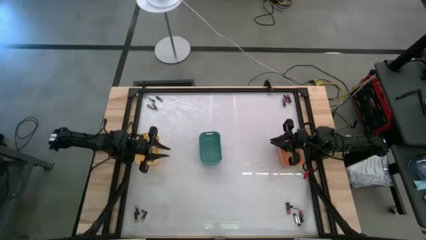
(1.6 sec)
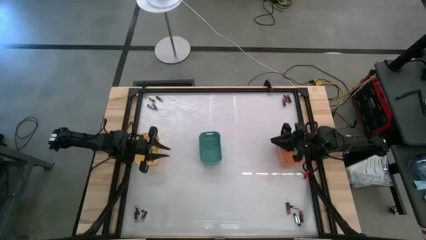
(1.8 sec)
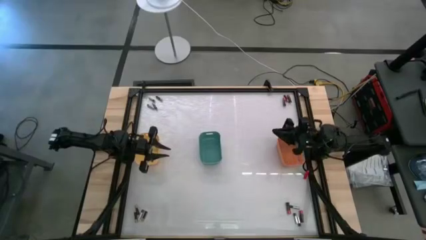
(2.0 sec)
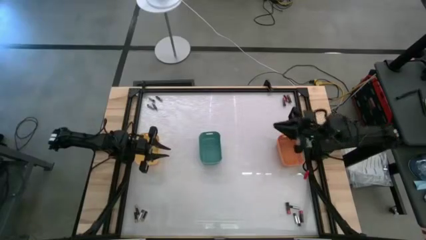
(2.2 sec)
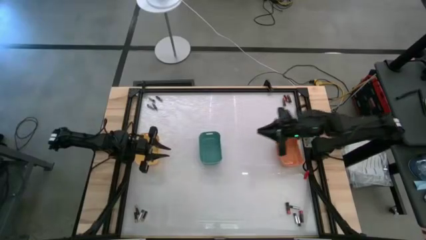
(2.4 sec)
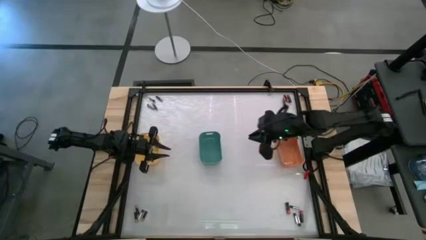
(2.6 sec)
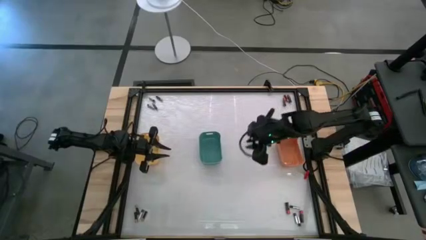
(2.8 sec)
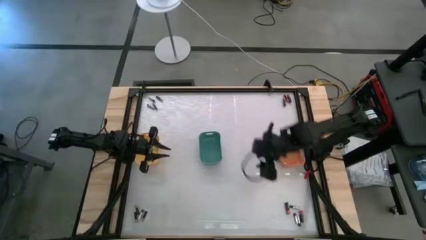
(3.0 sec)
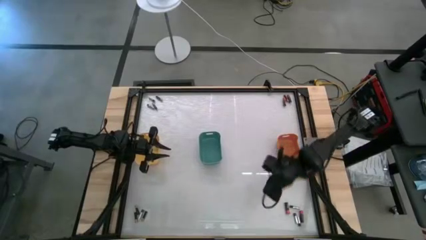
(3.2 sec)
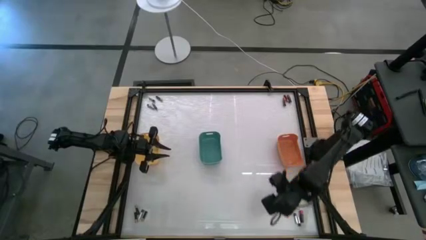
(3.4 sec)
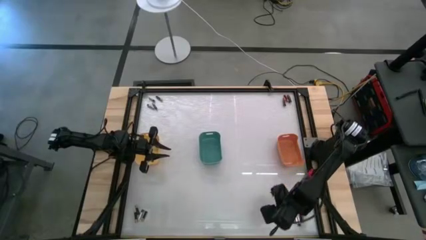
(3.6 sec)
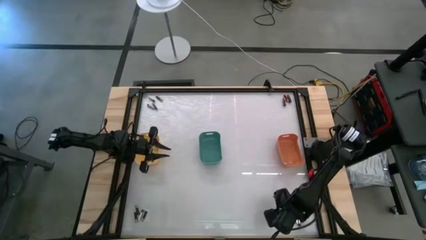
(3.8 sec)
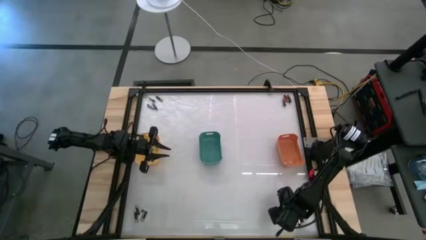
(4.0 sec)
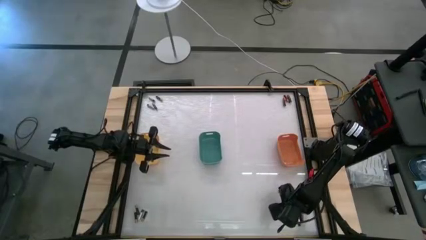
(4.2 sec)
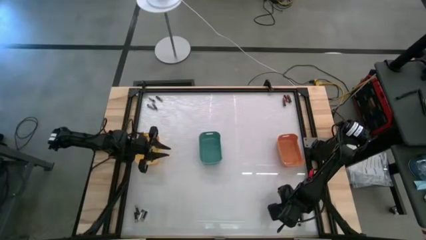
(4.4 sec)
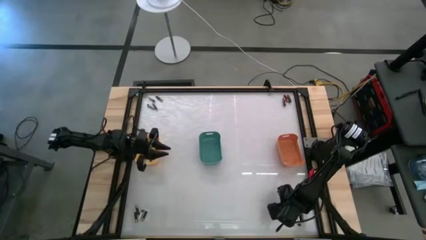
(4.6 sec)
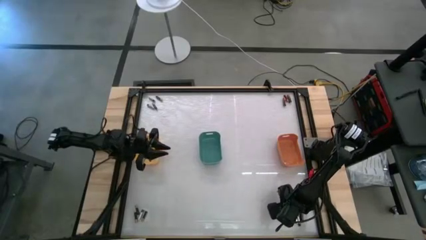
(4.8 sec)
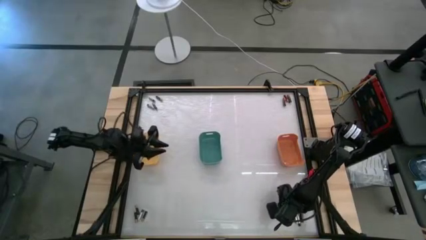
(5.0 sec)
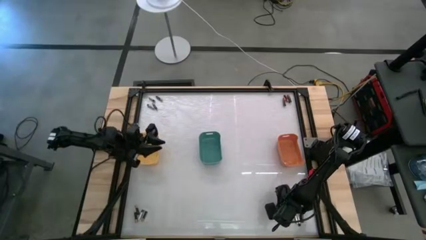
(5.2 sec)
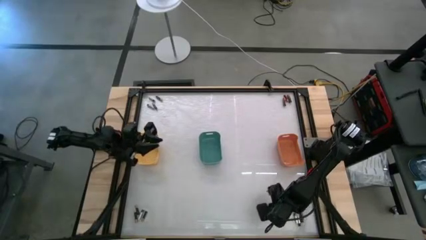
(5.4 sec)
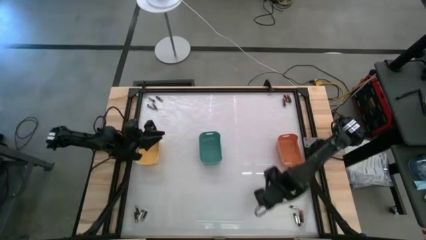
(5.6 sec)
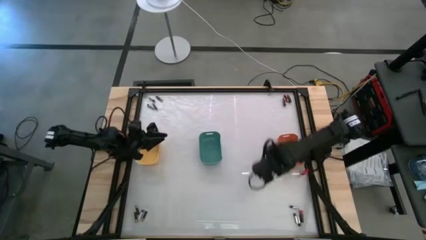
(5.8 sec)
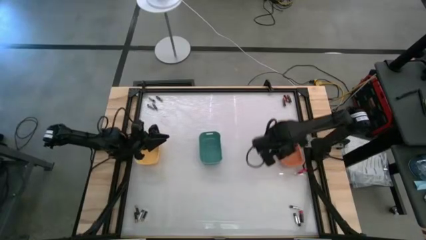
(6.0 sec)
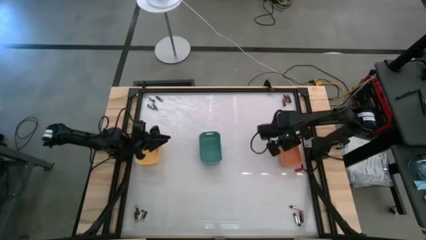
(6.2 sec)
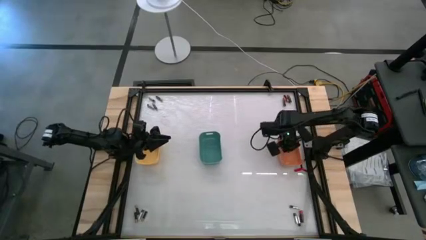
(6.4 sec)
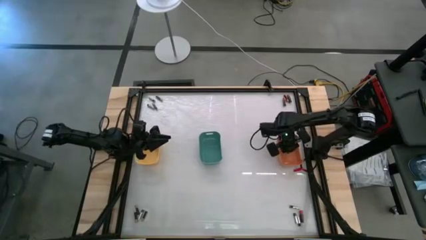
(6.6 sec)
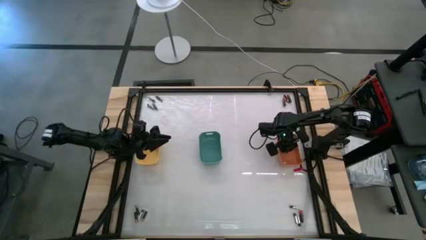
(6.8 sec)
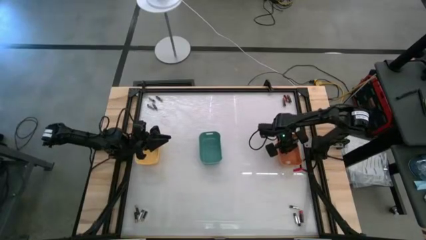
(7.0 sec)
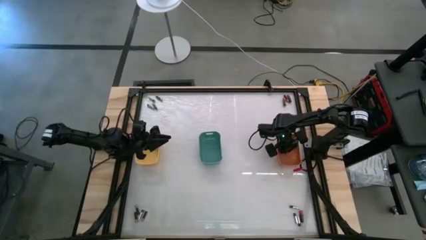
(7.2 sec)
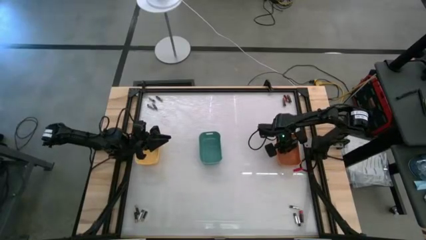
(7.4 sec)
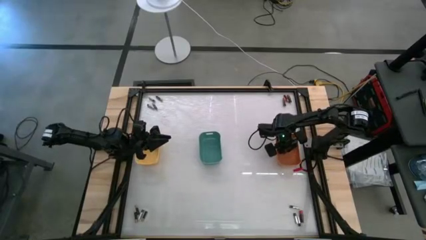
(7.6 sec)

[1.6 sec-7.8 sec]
Task: Sort batteries
Put the red battery into the orange bin

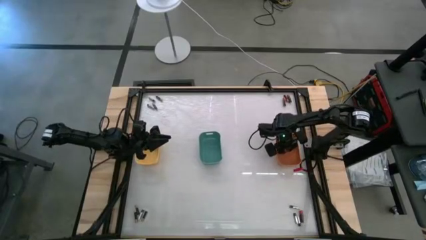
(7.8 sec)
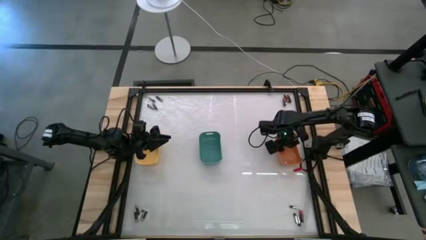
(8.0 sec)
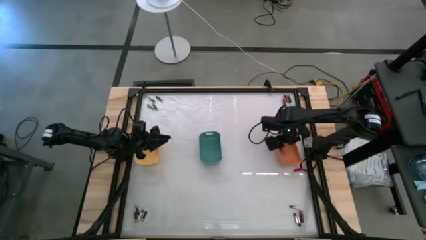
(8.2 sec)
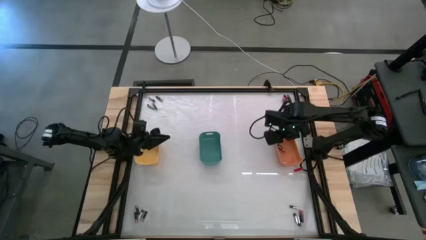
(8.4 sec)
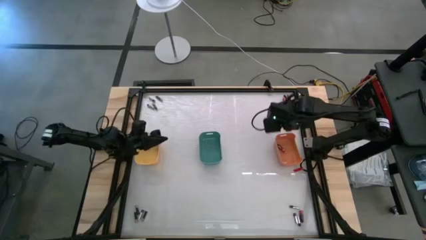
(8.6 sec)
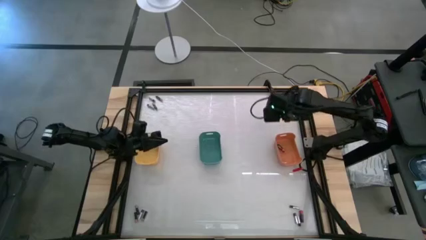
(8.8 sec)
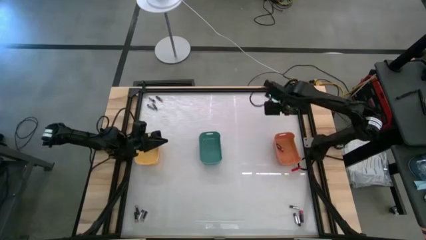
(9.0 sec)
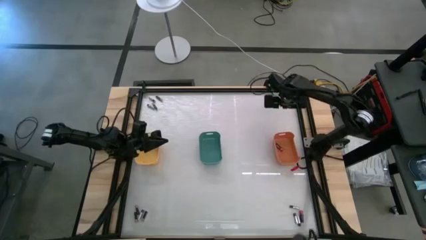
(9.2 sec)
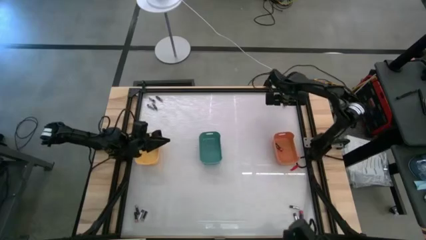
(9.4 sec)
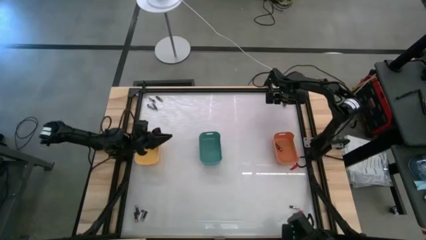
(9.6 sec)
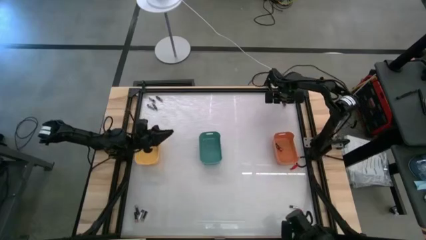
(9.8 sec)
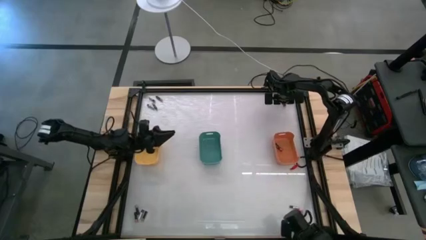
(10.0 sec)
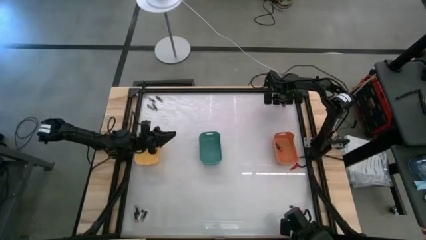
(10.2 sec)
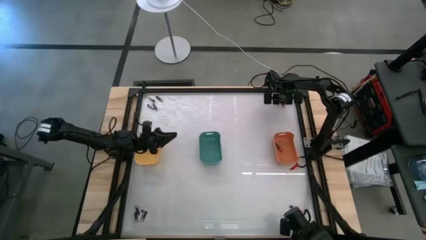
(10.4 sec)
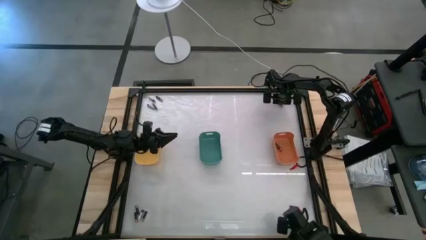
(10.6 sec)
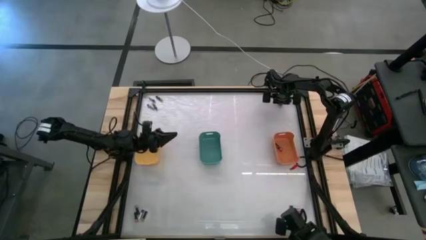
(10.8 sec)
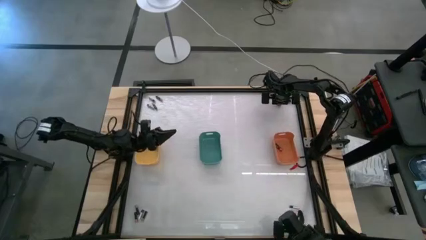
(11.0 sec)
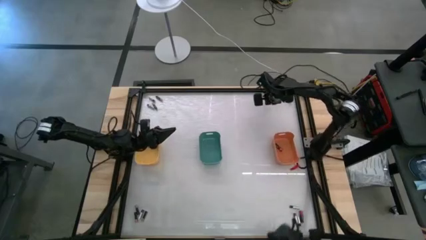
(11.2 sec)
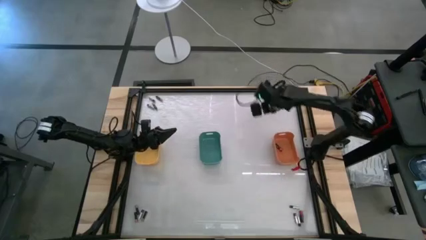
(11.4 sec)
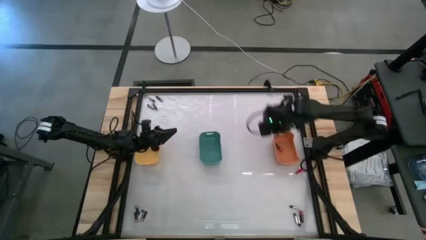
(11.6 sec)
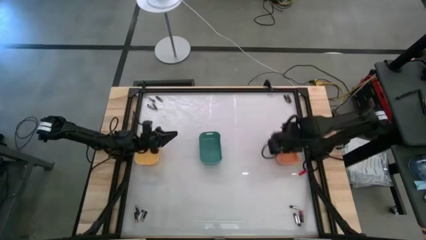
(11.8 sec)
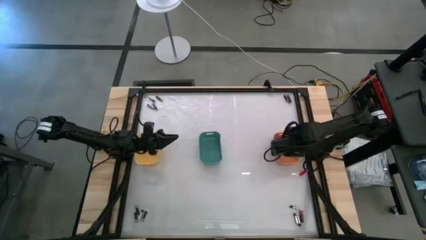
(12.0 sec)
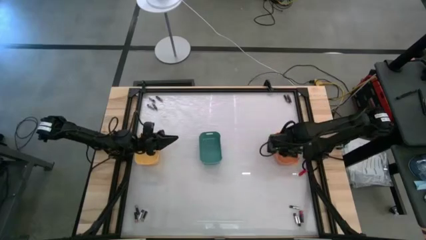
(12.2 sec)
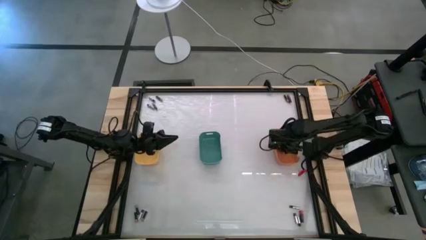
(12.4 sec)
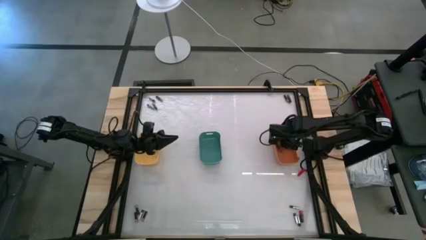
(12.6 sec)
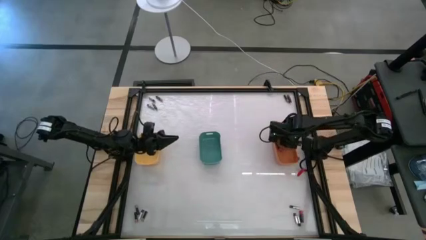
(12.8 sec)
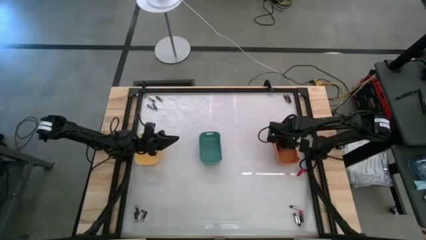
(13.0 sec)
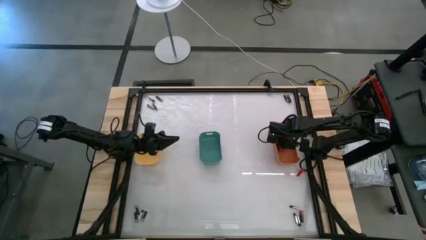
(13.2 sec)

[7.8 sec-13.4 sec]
Put the red battery into the orange bin

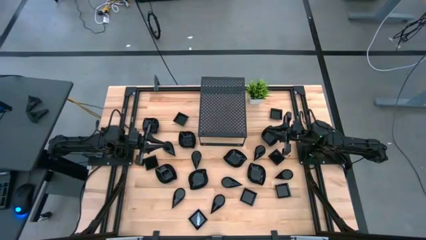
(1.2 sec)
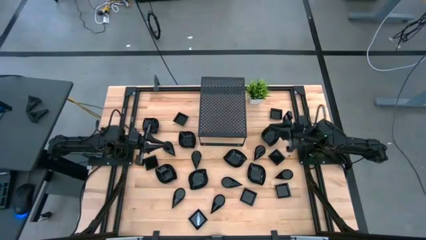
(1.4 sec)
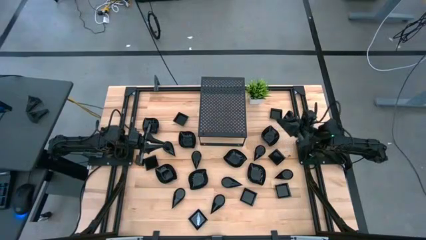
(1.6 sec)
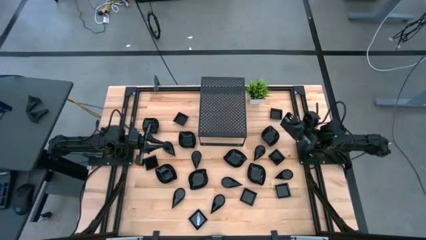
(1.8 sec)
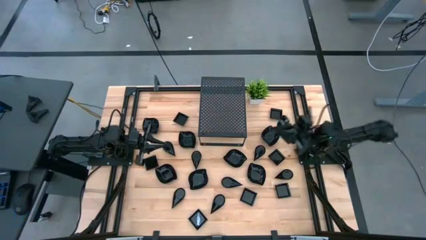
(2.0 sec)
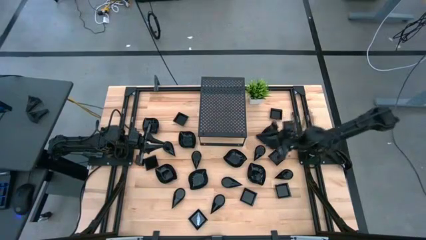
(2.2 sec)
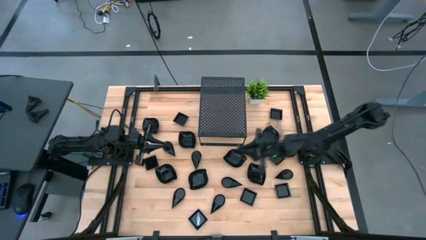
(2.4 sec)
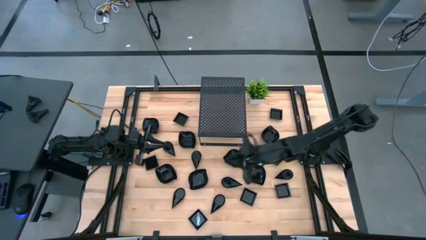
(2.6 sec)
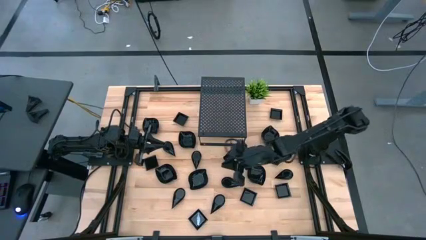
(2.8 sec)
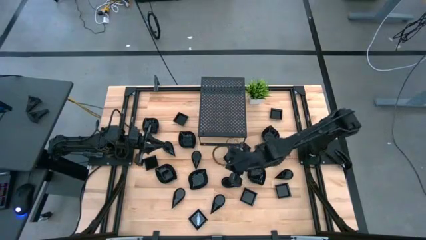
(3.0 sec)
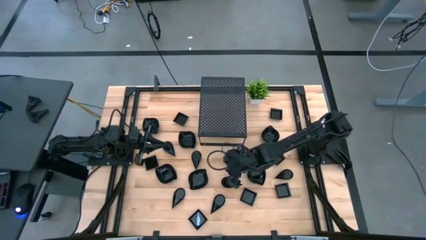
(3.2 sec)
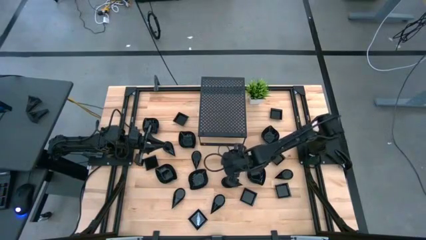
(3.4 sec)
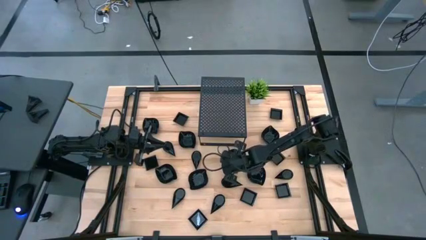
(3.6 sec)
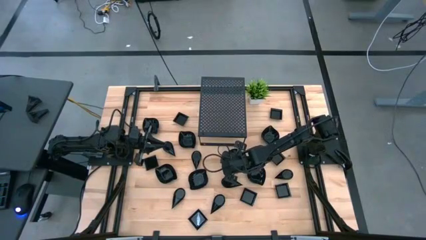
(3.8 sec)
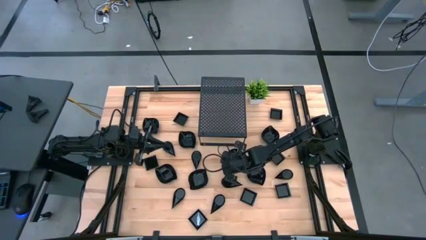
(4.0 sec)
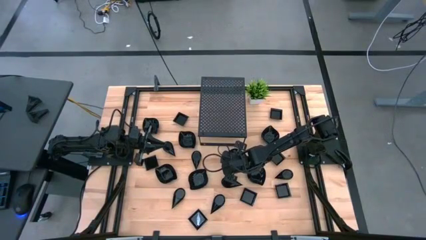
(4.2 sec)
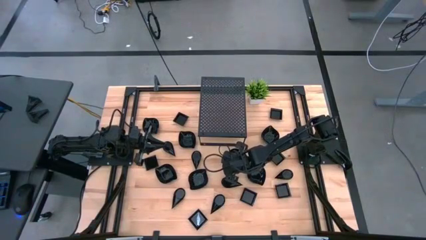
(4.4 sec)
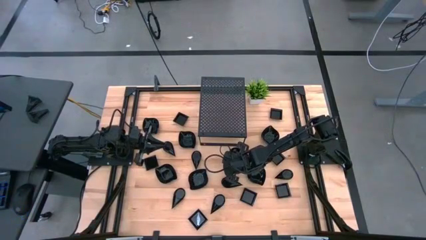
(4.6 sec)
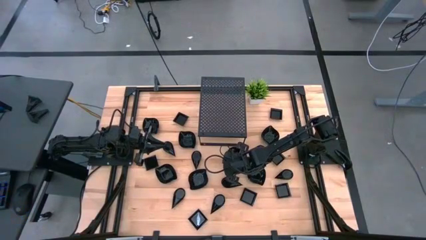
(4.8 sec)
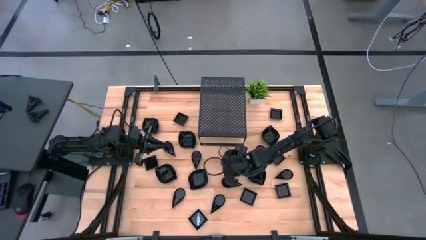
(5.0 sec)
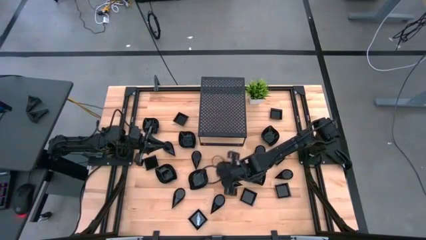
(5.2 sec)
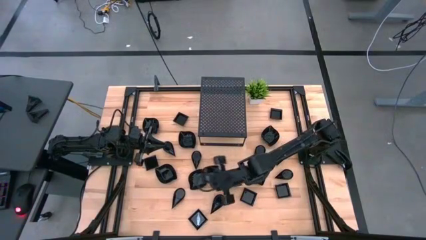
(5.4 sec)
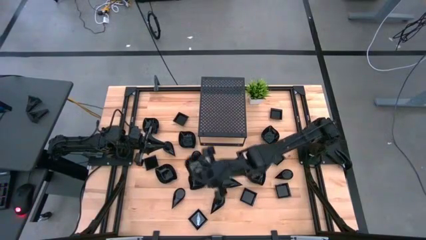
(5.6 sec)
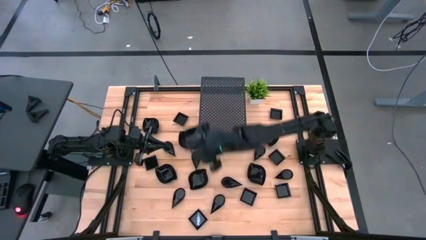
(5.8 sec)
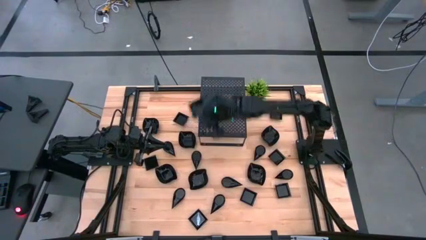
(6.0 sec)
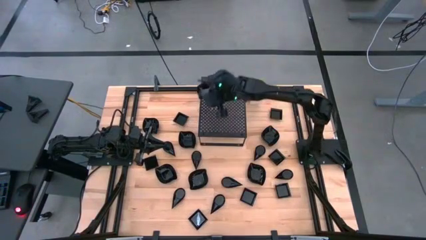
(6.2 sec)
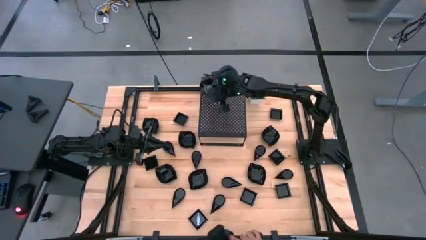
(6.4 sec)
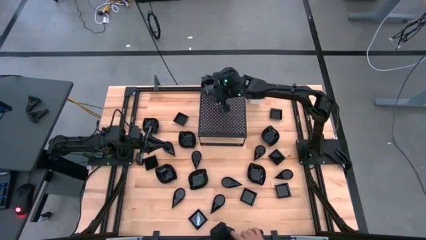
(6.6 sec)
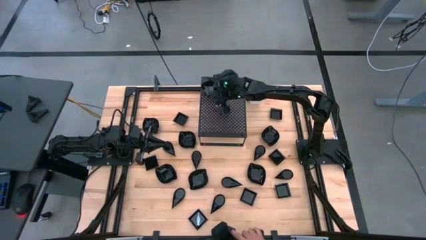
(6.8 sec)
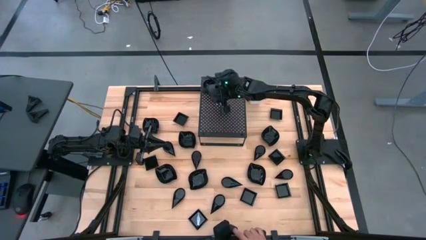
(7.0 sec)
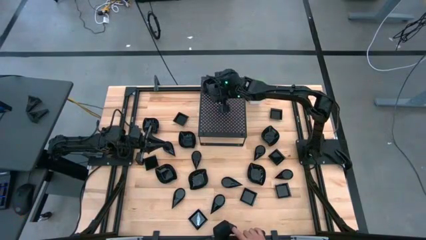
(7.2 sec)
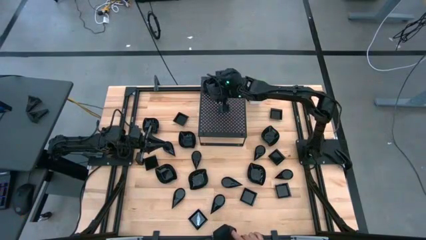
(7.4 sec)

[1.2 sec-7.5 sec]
Task: Pick & Place Mini shaped plates
Put the black leaf-shaped plate on the shelf
